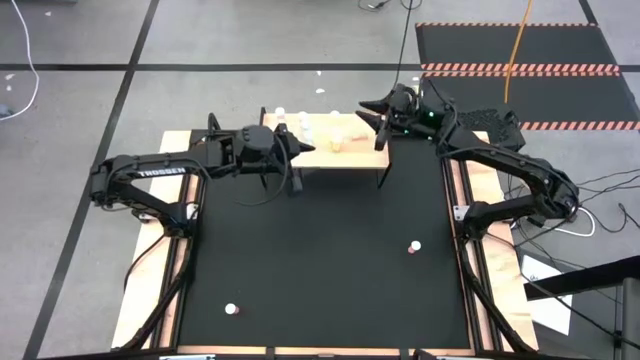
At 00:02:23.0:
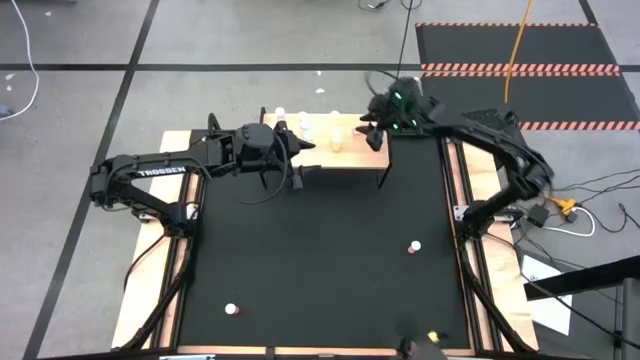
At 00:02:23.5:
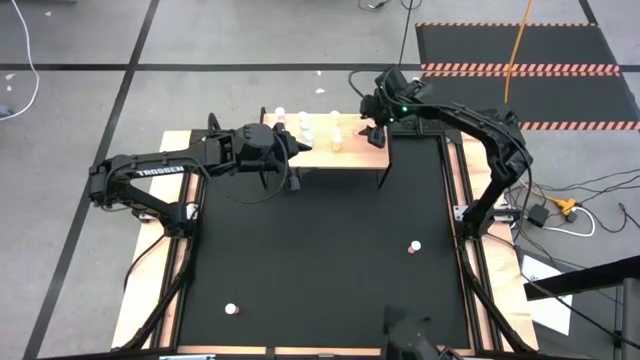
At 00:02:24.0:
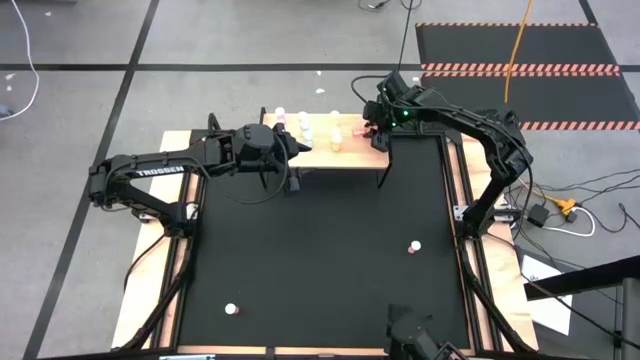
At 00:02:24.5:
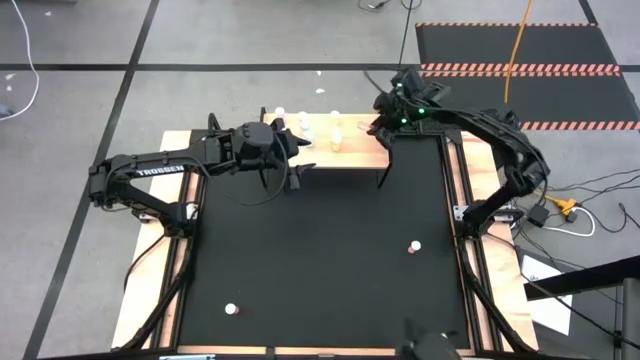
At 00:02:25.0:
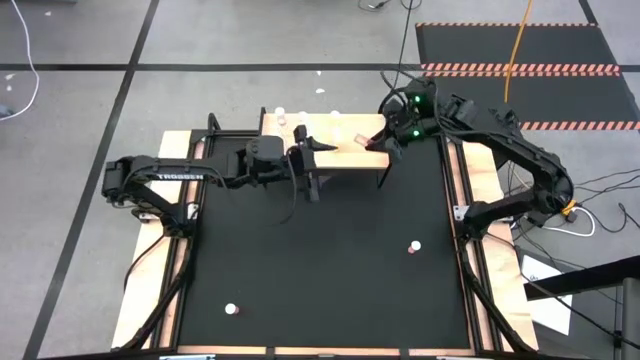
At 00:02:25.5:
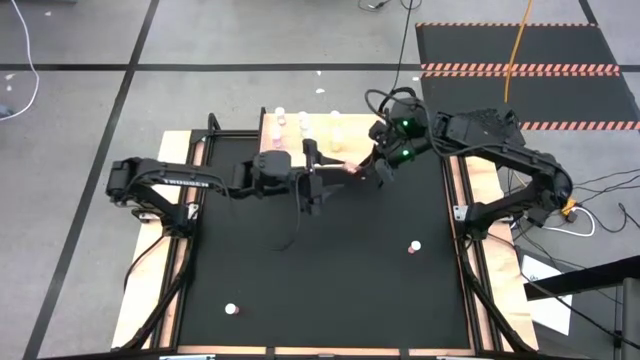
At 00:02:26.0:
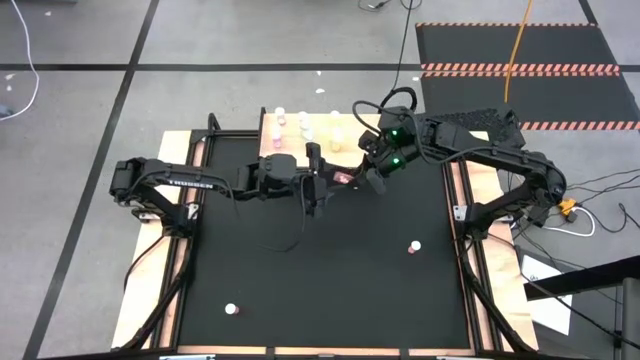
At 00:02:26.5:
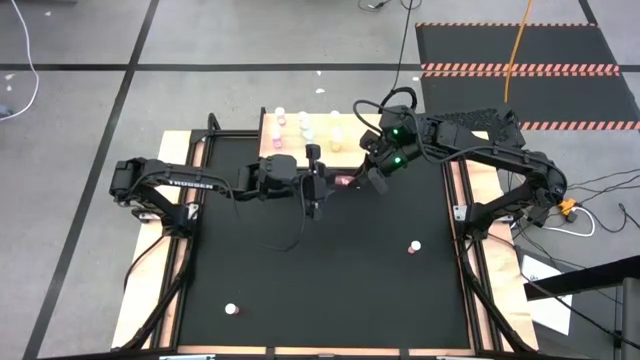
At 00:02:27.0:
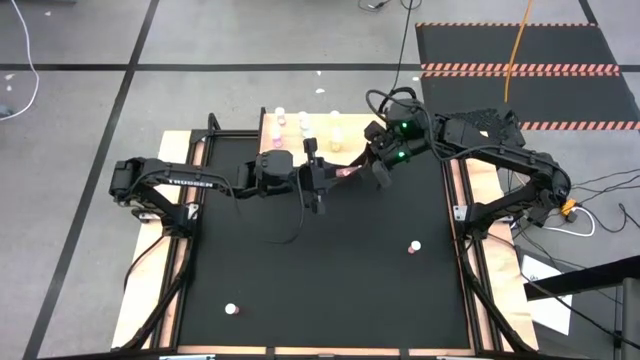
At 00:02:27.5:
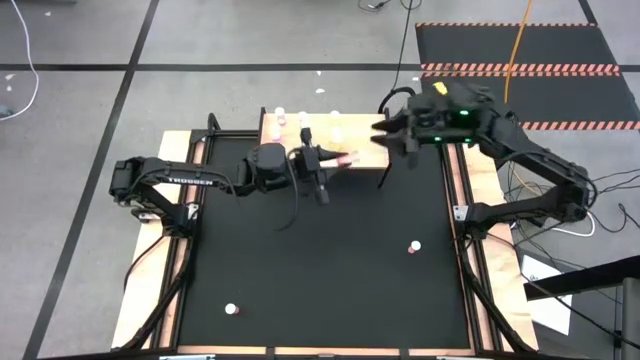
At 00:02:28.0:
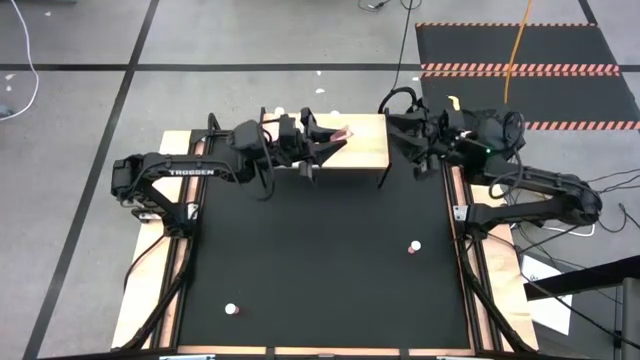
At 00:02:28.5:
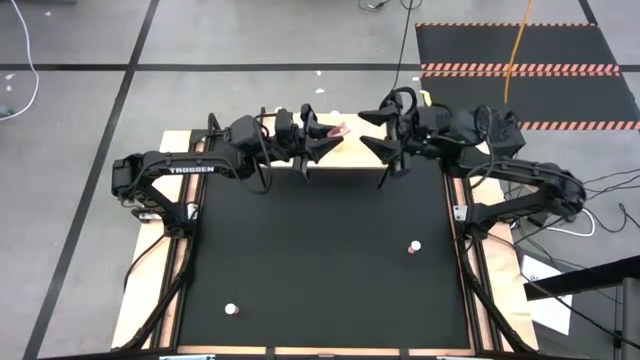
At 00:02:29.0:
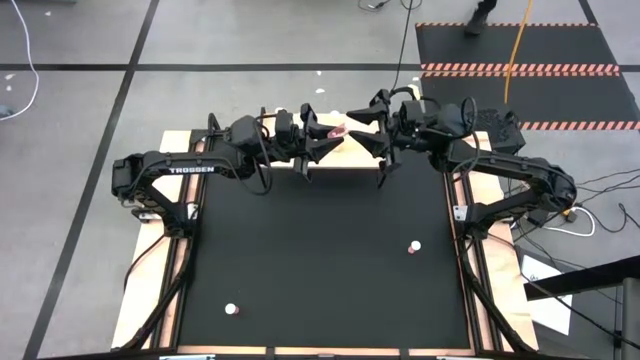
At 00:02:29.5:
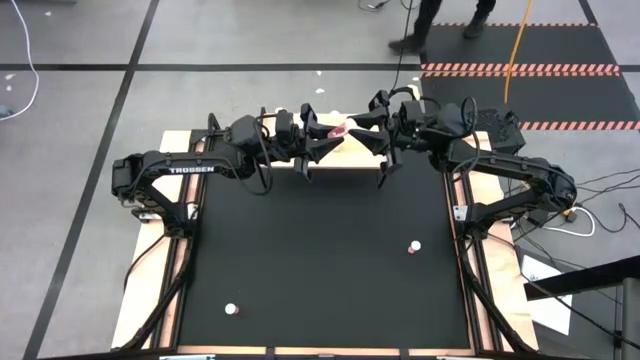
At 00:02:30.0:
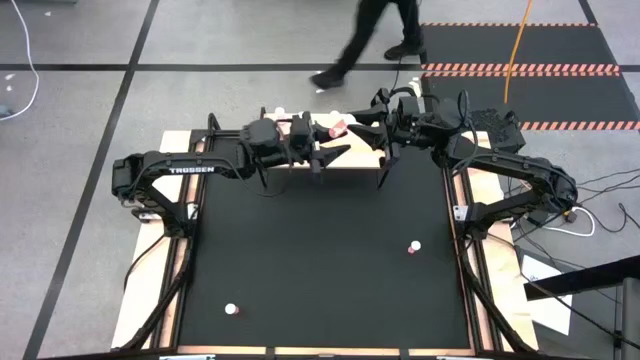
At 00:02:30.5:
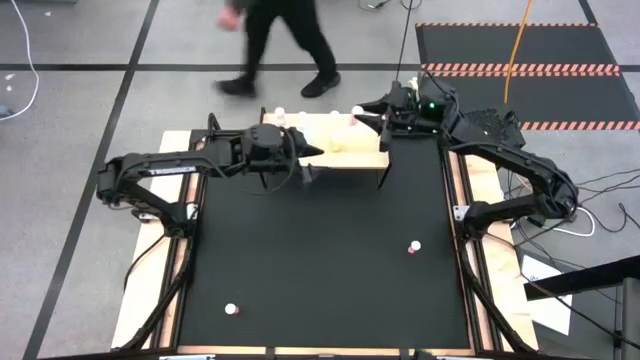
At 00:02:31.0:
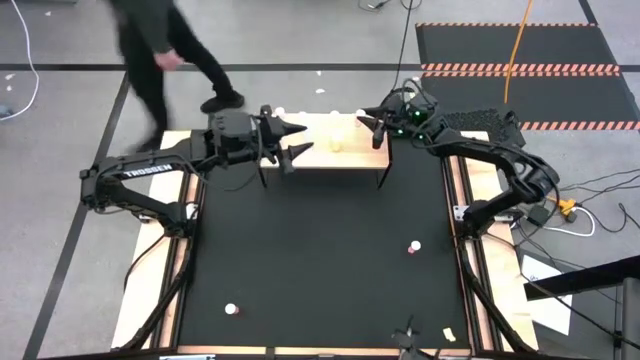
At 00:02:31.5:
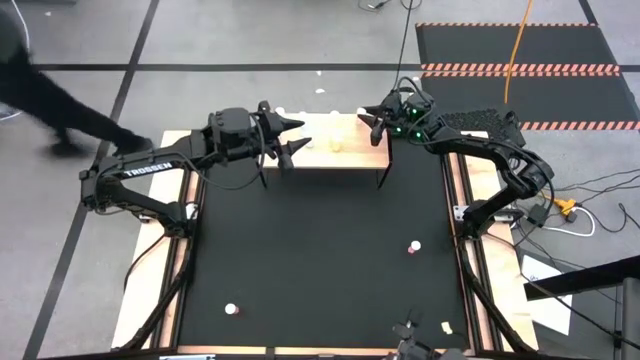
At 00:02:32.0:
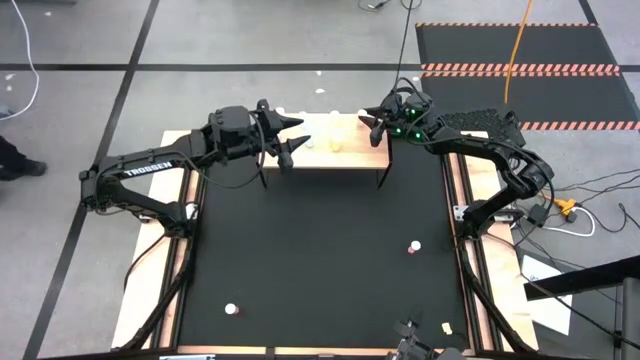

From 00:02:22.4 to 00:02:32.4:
Task: Pick and place medicine bottles onto shelf by color
Put the top left pink pill bottle on the shelf

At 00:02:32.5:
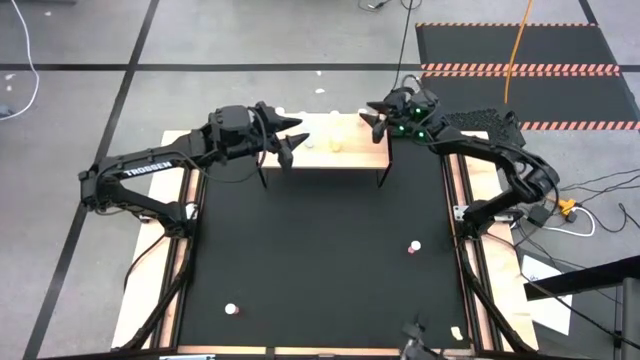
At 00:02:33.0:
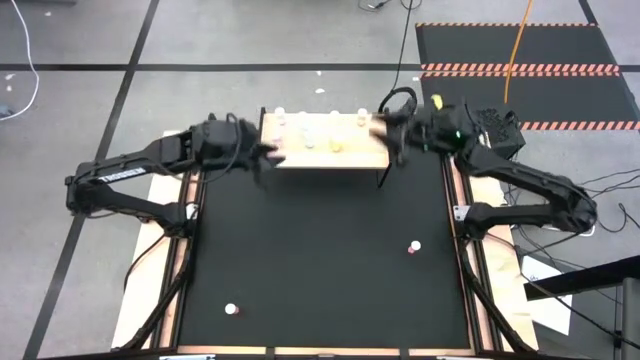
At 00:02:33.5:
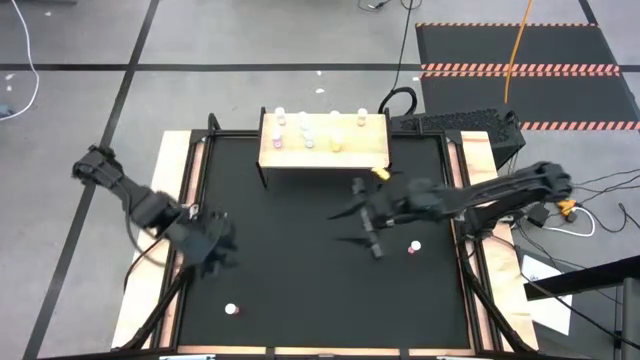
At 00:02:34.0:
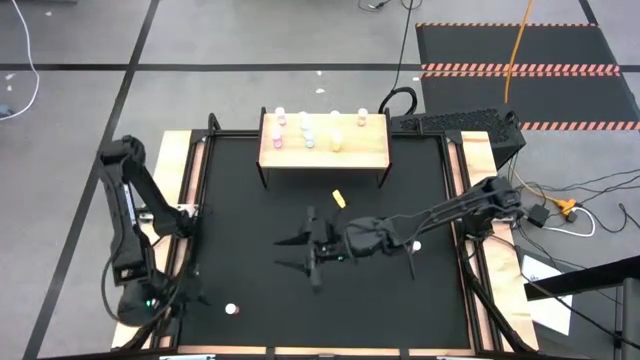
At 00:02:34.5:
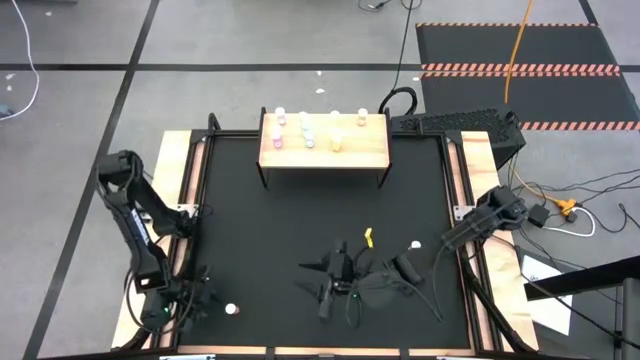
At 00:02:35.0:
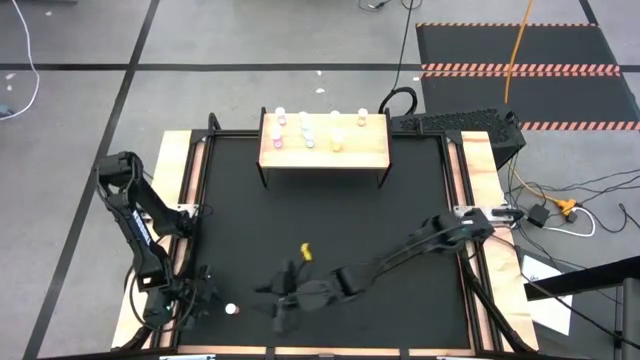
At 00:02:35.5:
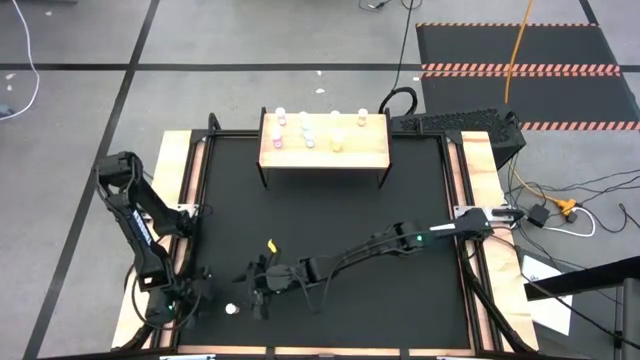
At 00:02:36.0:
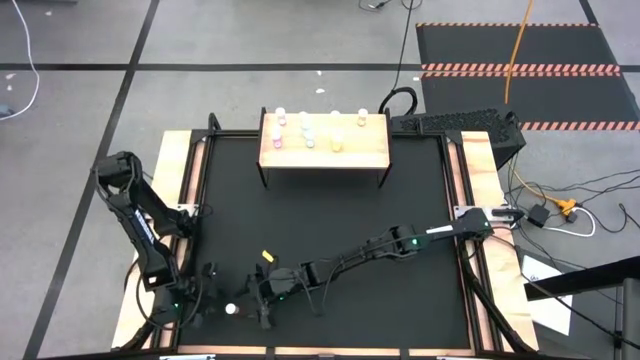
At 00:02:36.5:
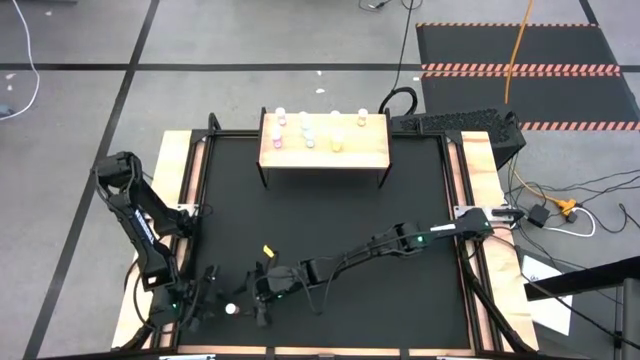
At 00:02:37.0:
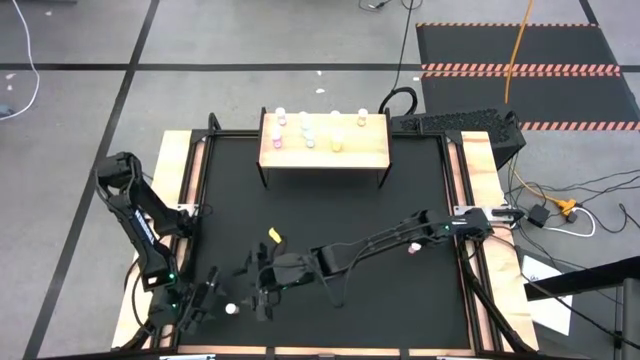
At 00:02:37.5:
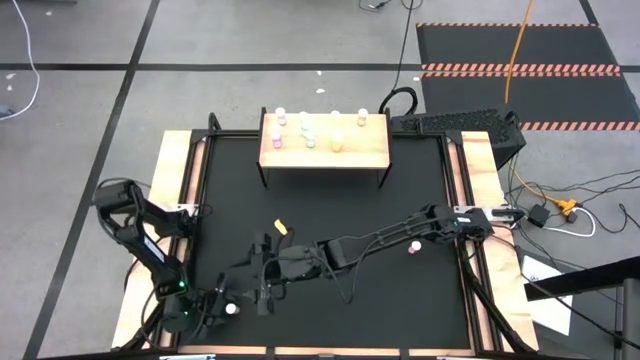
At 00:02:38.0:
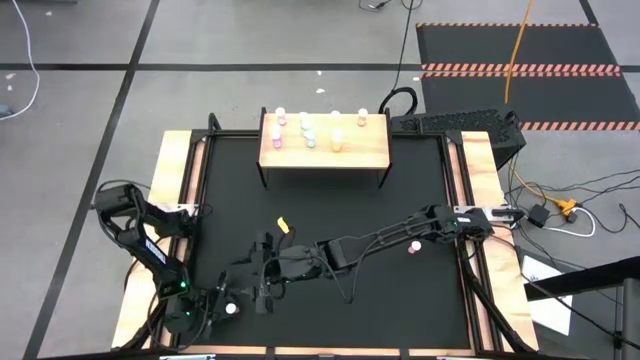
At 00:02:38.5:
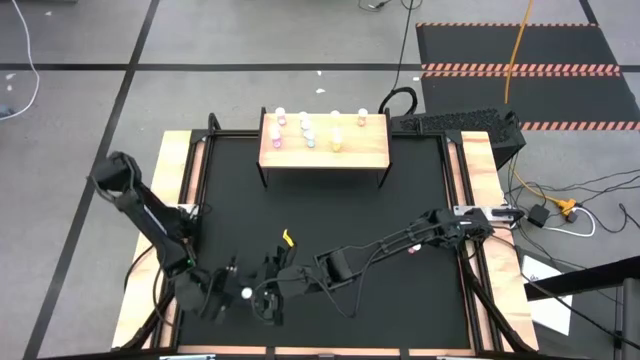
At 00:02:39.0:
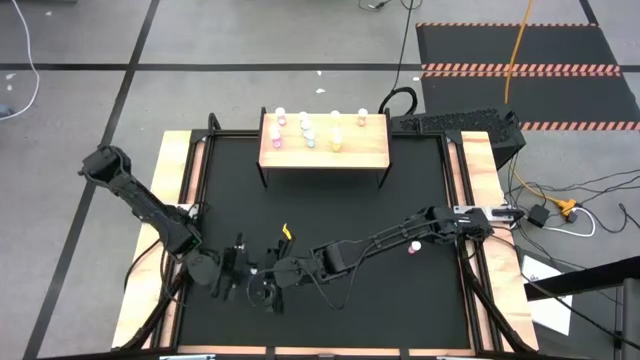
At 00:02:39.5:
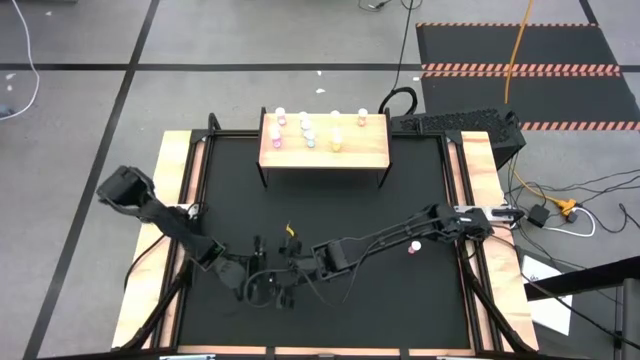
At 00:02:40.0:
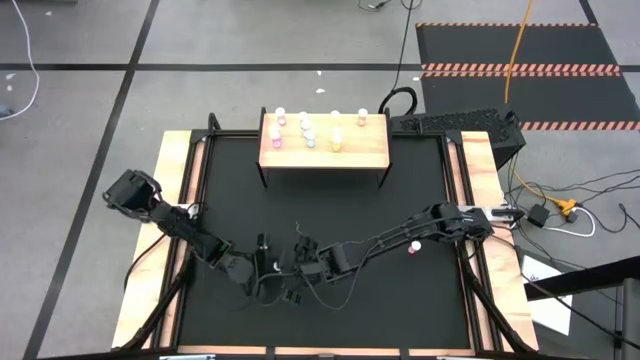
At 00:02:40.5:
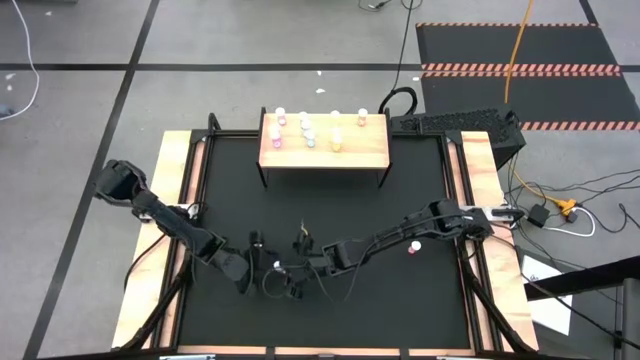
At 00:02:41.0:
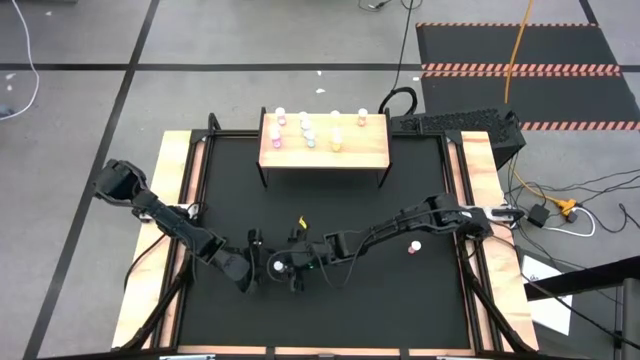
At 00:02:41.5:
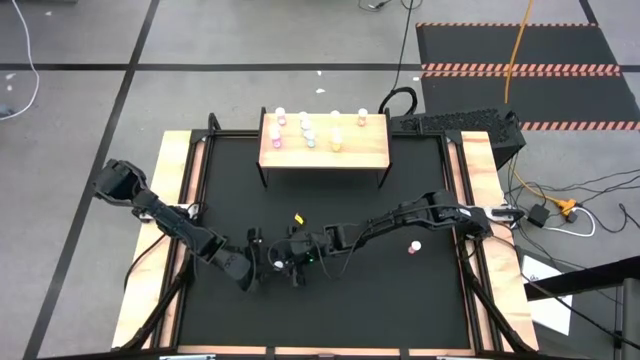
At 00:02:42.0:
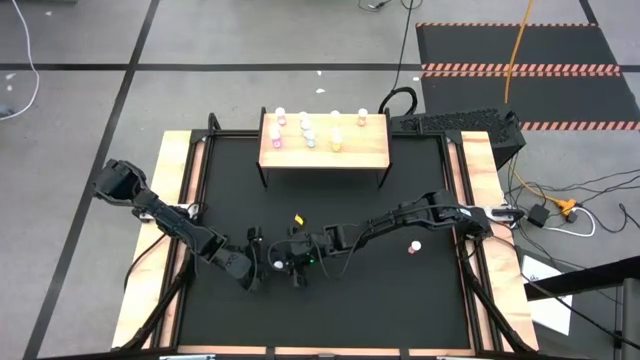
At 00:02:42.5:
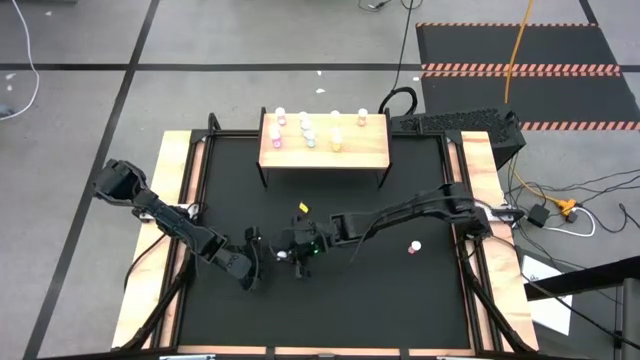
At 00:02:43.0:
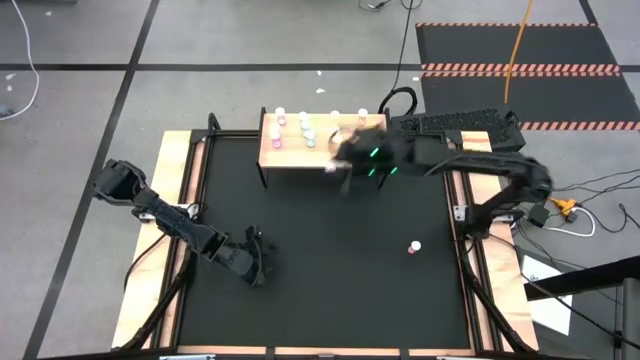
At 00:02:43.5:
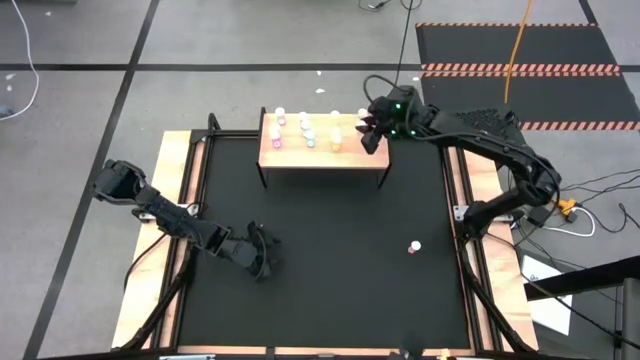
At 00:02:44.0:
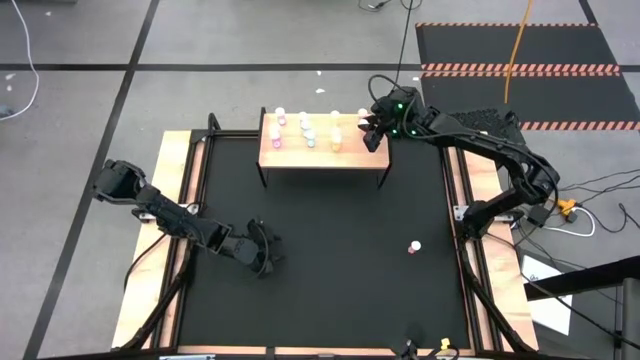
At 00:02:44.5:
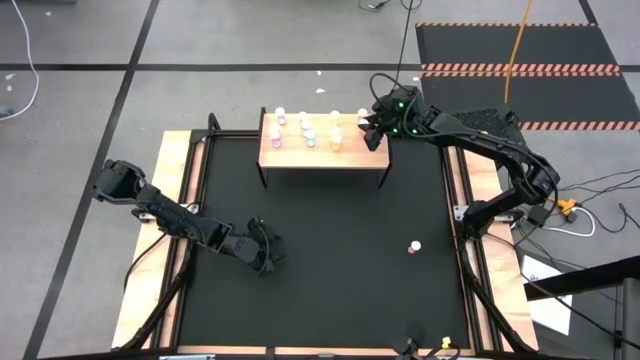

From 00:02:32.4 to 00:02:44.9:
Put the pink pill bottle on the shelf aligned with the other pink pill bottle
